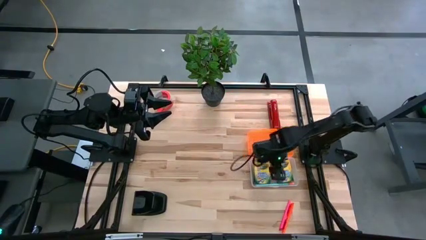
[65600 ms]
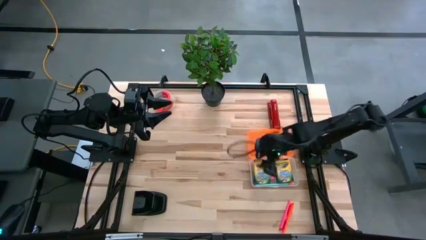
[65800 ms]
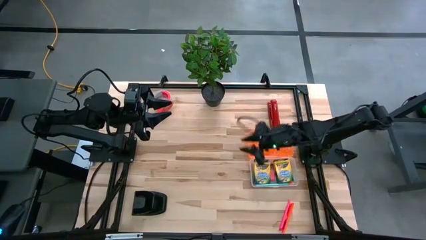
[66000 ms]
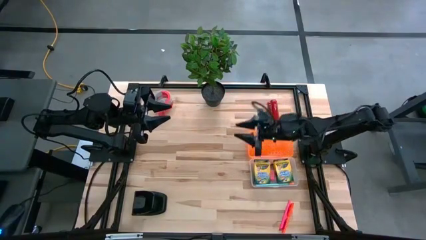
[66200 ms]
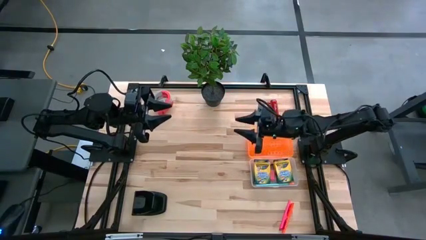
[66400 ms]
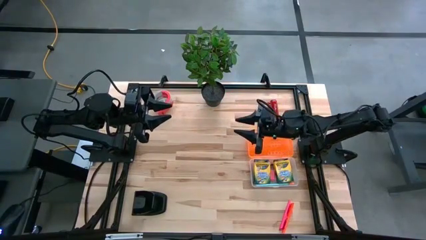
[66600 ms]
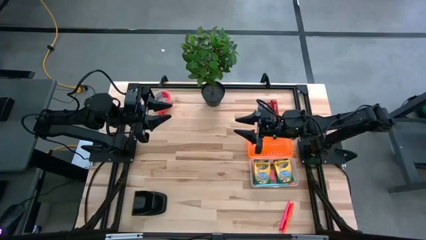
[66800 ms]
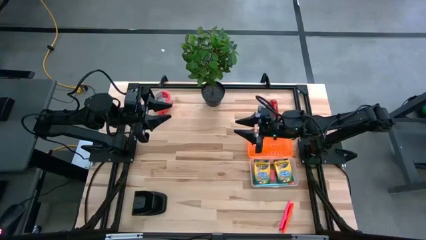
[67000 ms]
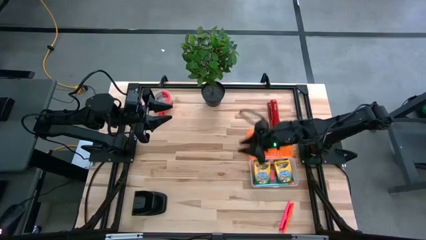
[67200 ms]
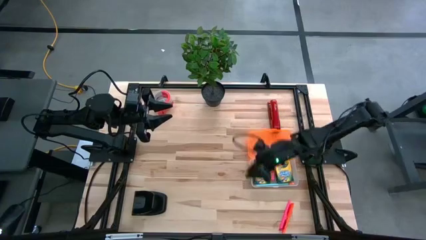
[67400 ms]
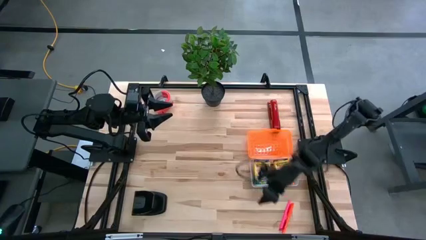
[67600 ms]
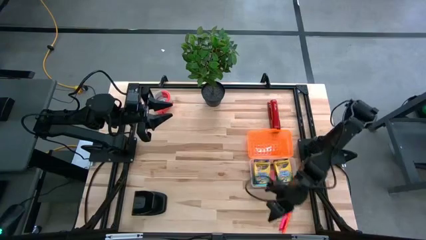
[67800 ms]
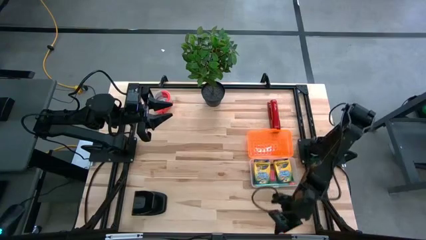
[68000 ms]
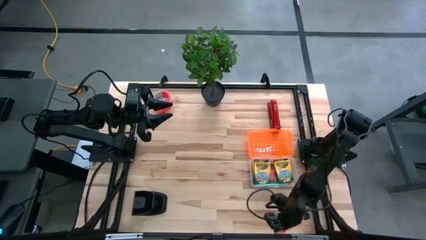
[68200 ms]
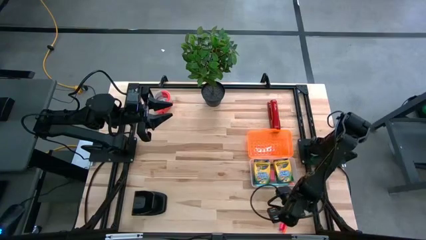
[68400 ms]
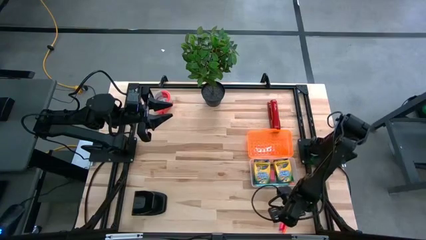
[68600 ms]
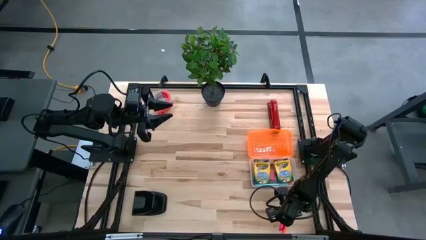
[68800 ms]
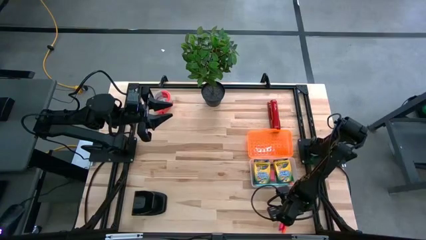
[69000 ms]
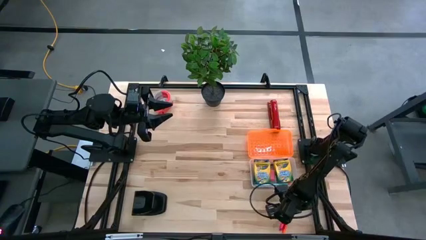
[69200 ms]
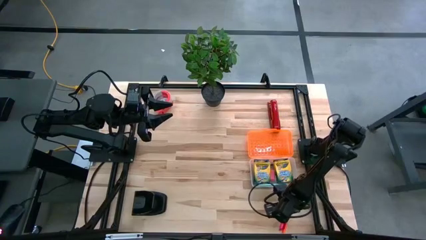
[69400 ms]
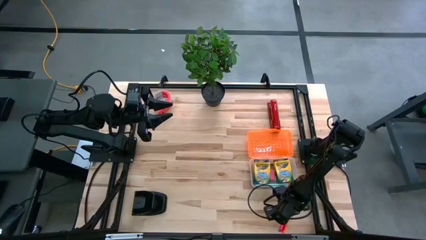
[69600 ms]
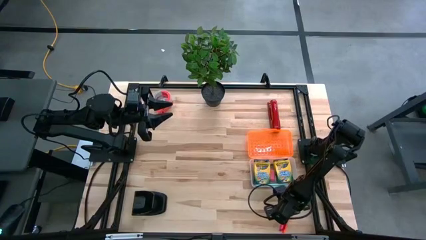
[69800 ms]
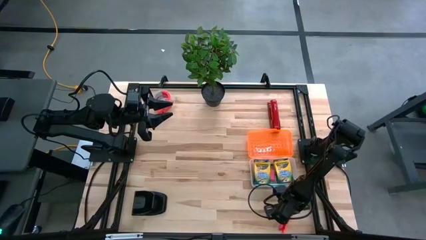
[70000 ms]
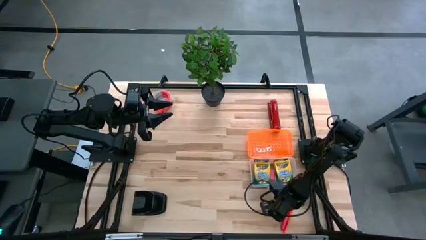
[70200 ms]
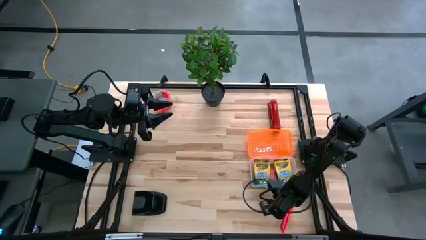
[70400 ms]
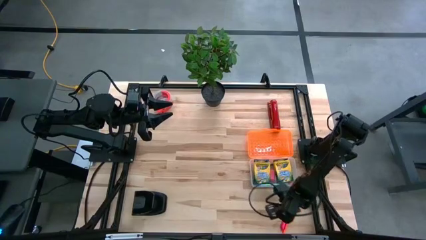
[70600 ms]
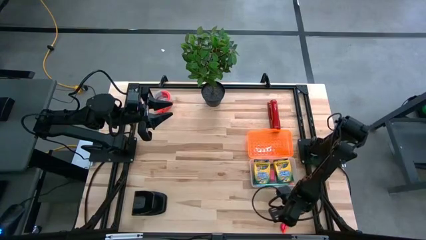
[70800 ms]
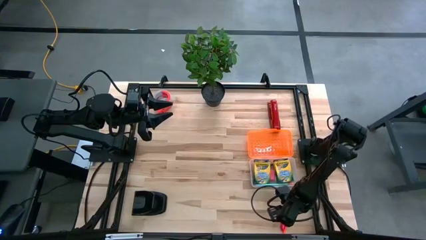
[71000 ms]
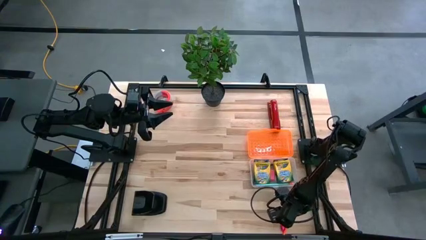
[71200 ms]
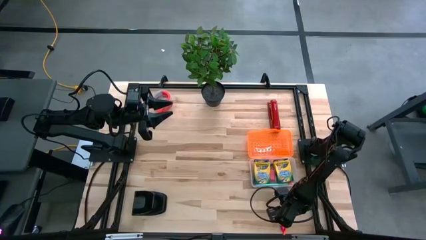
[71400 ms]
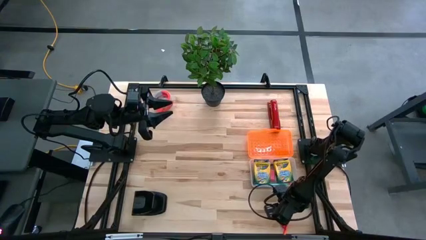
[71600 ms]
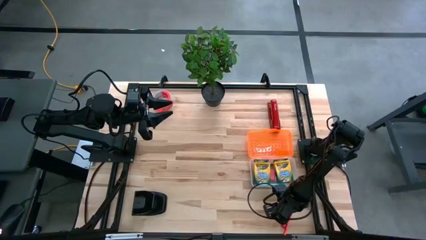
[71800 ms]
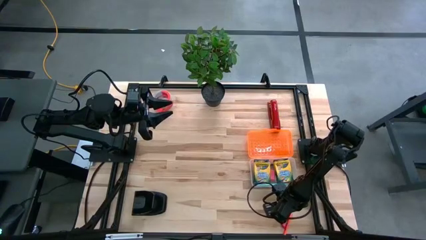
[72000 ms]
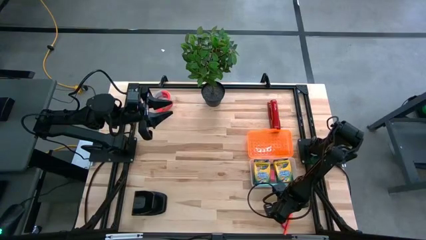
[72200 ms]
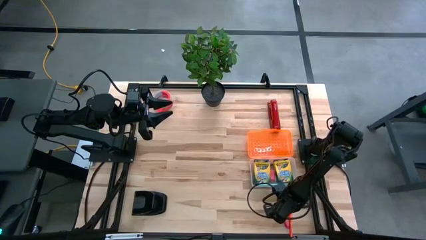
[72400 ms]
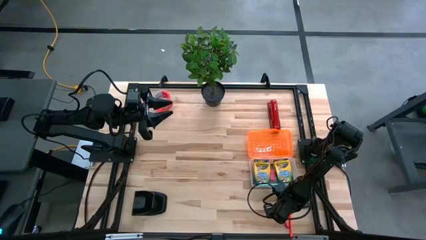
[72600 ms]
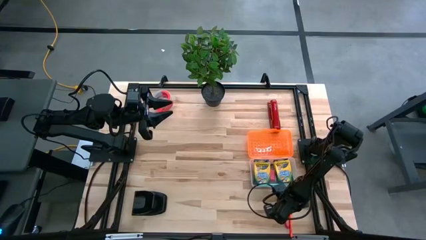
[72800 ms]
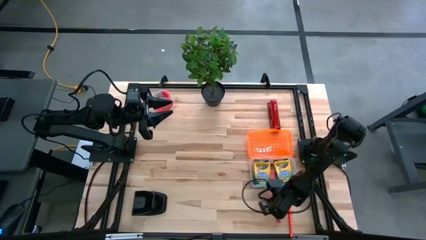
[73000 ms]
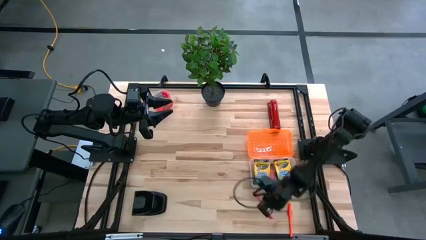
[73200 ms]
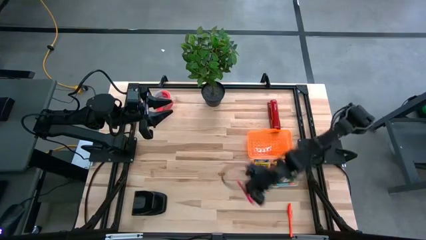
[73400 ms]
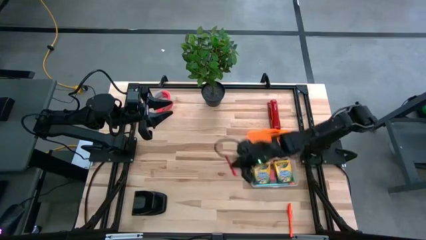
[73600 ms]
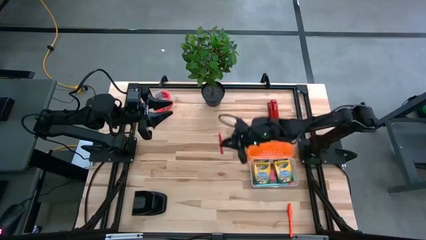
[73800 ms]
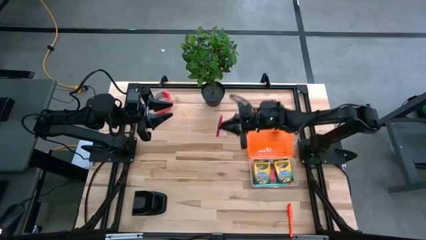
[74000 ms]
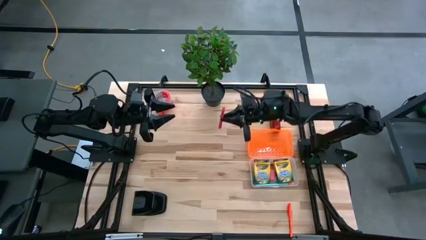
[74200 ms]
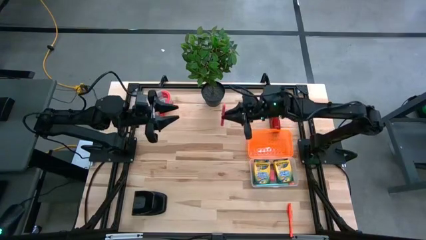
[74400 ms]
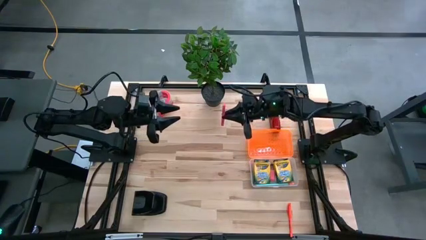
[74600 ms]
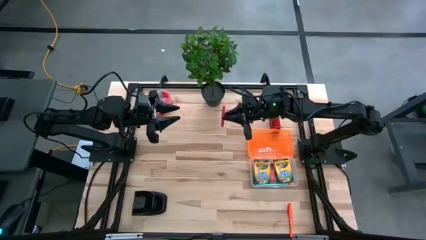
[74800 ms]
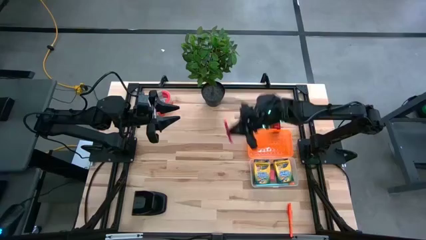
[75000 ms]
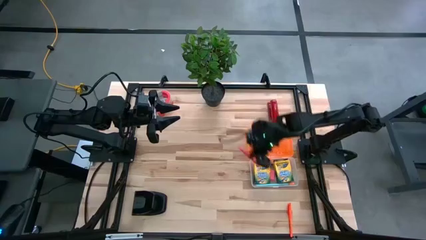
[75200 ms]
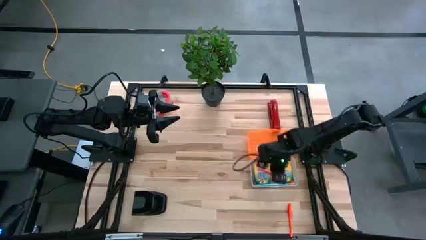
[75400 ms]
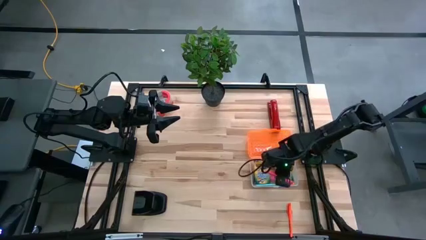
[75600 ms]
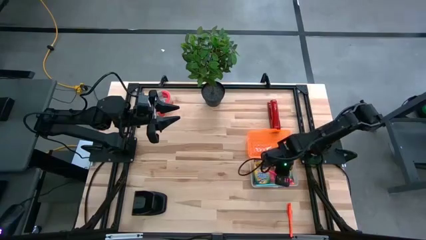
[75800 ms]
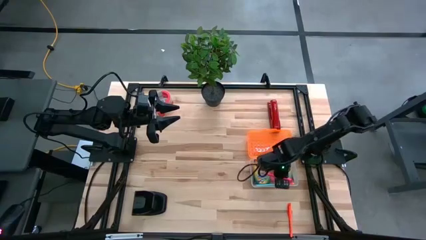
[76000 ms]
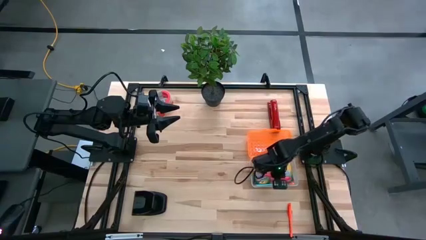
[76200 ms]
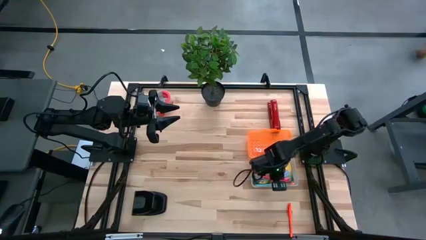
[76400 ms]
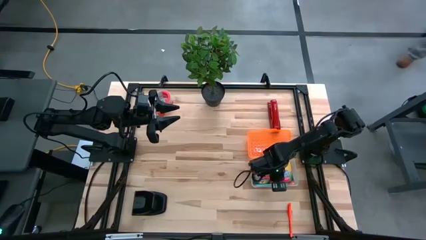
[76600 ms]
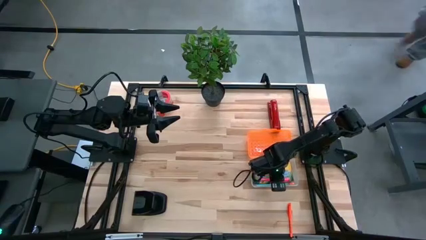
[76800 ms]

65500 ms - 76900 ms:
Task: Pack school essentials
Put the pink pen into the orange supply box

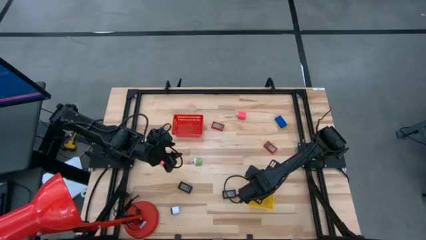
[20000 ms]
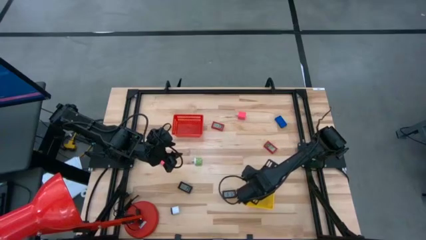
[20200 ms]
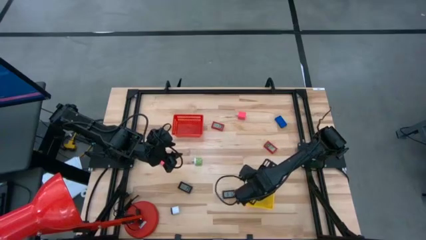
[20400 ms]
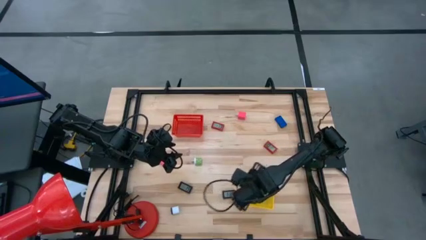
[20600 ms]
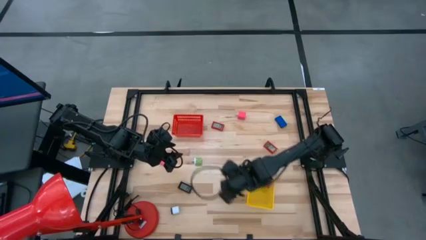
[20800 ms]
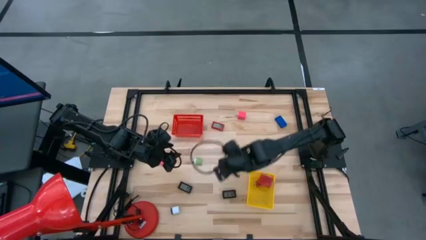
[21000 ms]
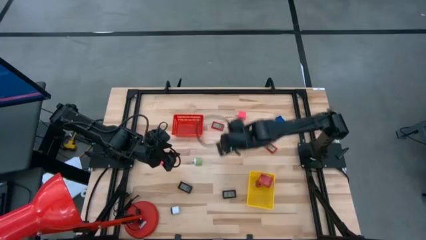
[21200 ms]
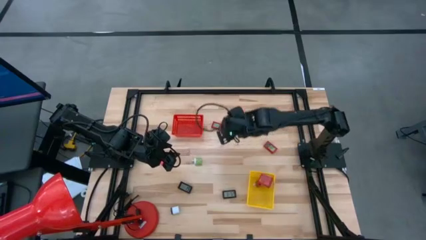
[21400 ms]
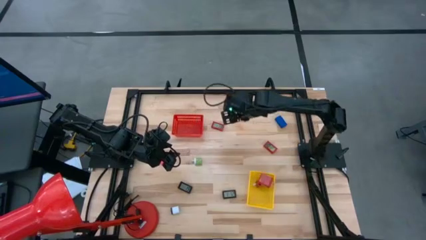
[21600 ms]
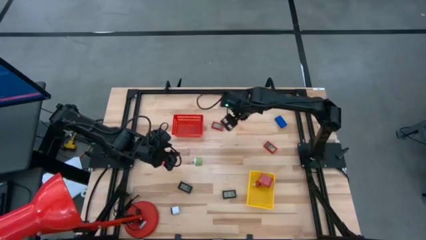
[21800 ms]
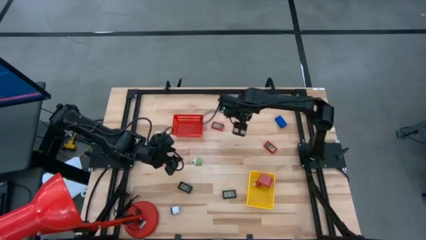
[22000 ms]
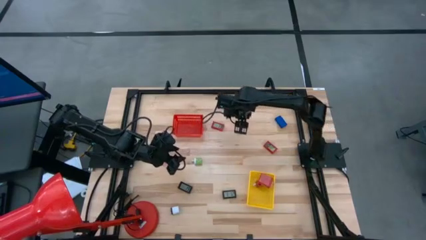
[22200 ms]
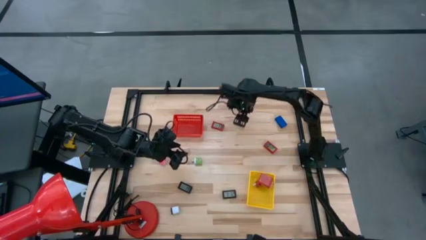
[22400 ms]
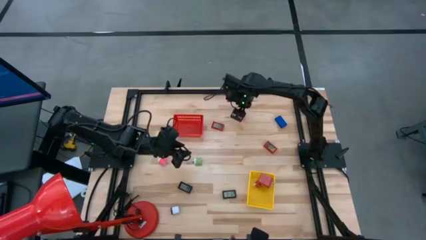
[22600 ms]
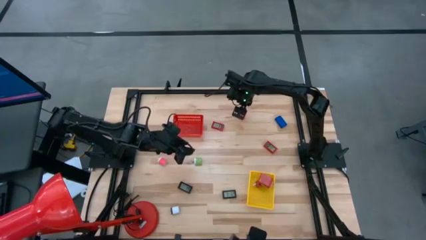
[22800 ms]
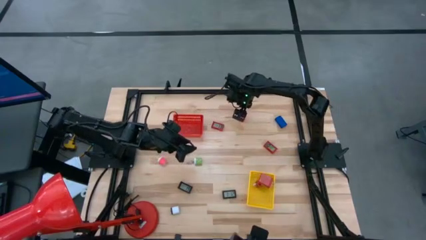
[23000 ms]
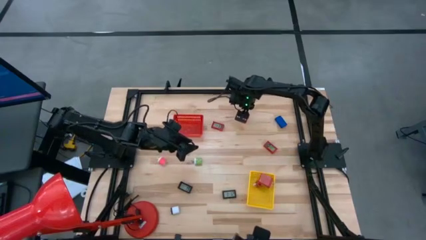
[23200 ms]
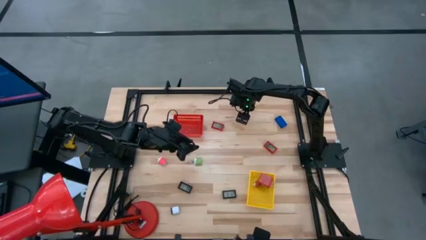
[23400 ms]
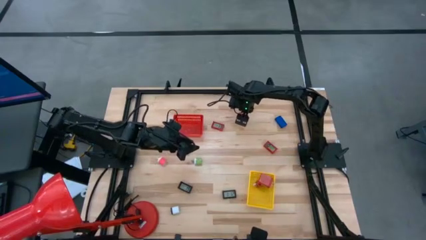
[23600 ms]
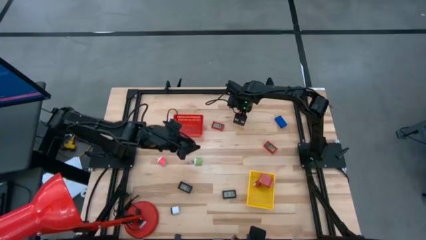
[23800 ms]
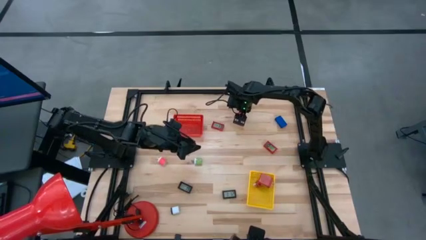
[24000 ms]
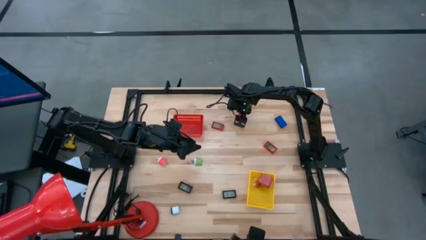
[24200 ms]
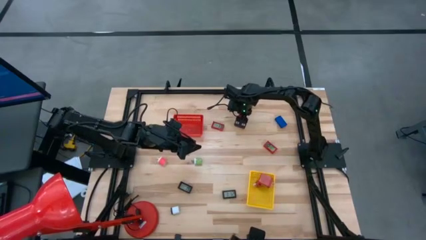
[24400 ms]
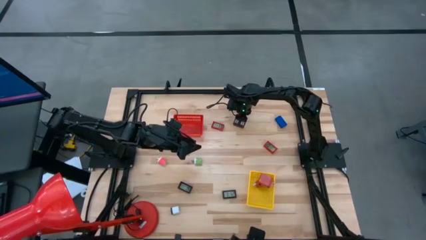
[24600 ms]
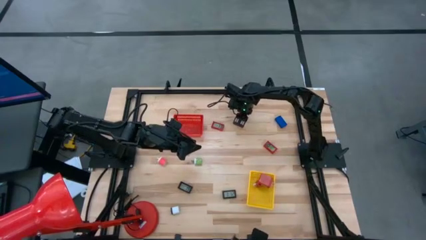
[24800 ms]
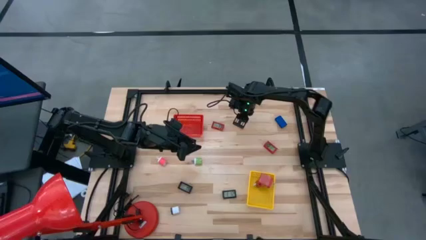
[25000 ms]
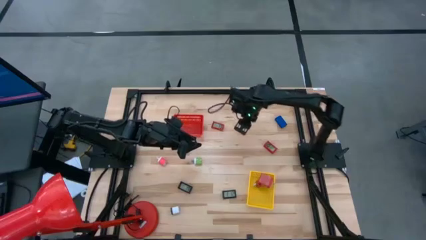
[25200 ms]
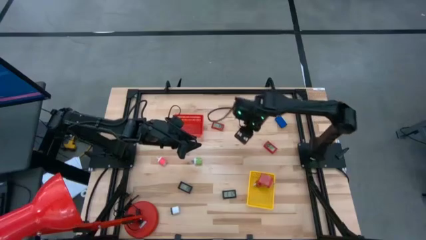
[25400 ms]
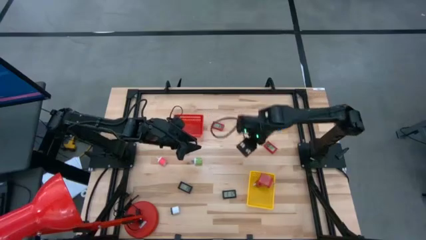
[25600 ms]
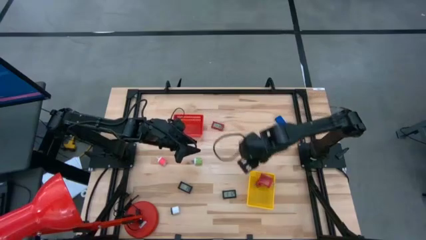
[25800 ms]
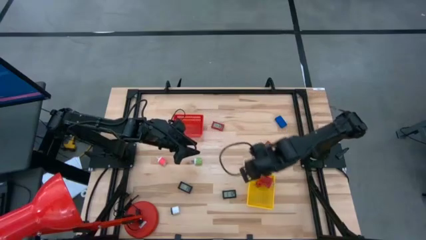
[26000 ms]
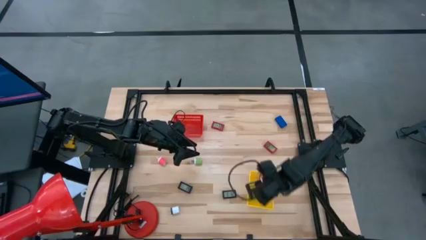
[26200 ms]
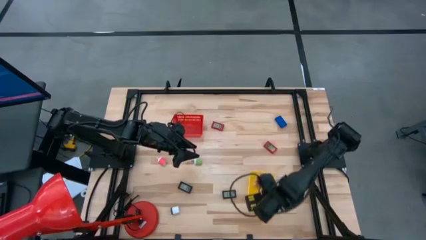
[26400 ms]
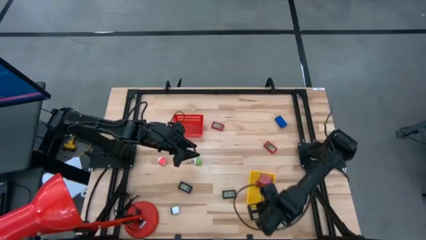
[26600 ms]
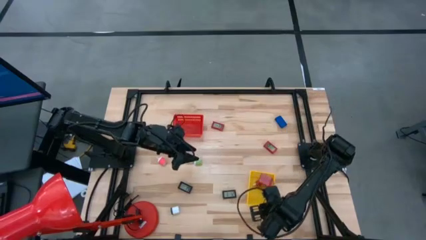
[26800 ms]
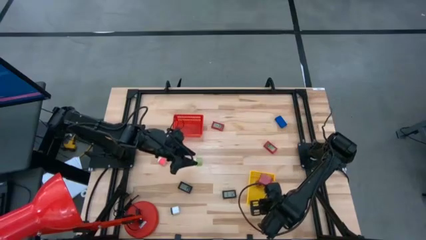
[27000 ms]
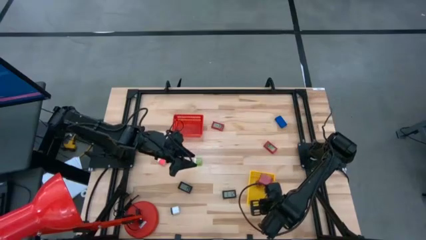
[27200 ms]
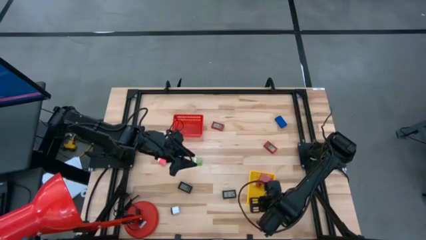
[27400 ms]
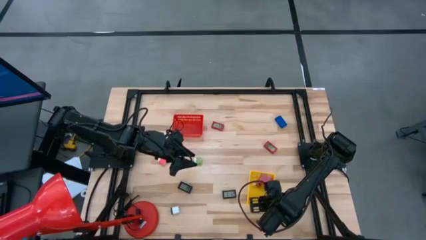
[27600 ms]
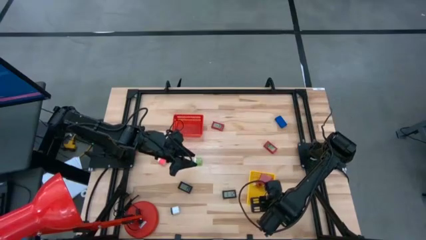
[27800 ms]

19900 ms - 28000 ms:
Task: Pick & Place Office items
Put the top right pink charger adapter into the yellow basket
